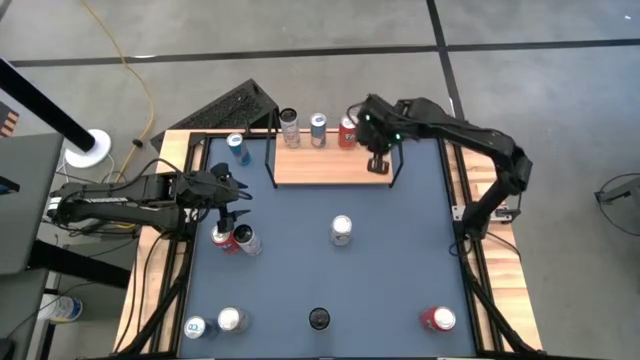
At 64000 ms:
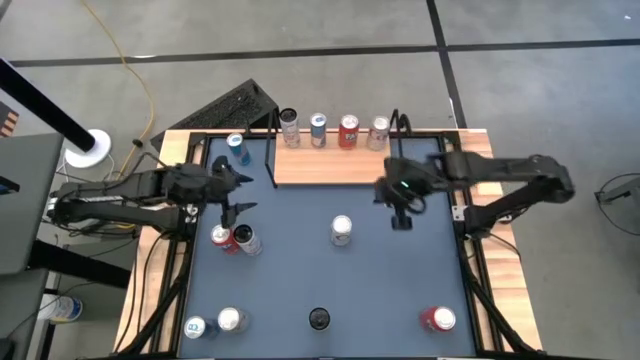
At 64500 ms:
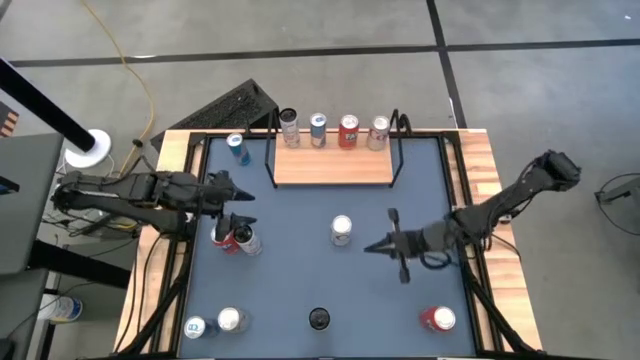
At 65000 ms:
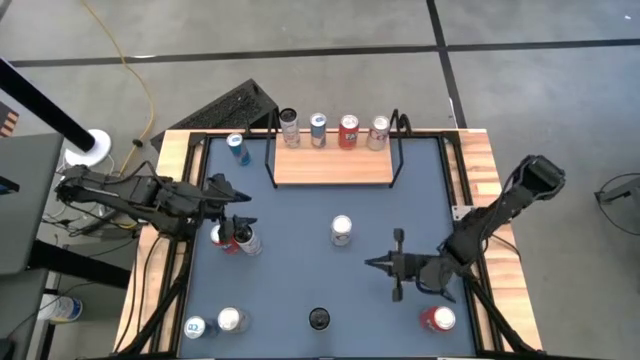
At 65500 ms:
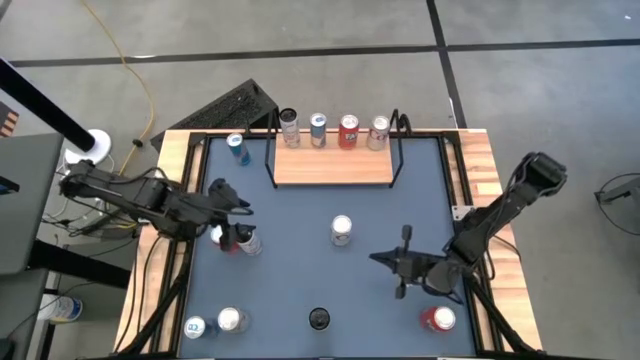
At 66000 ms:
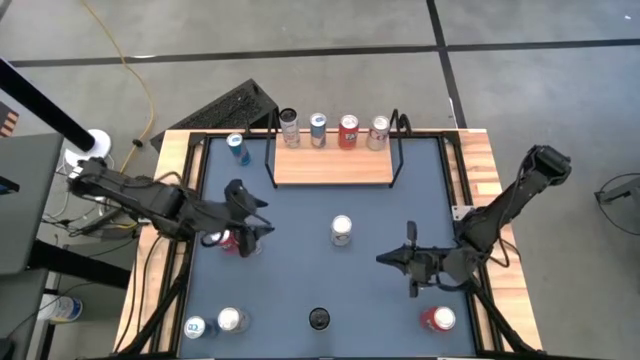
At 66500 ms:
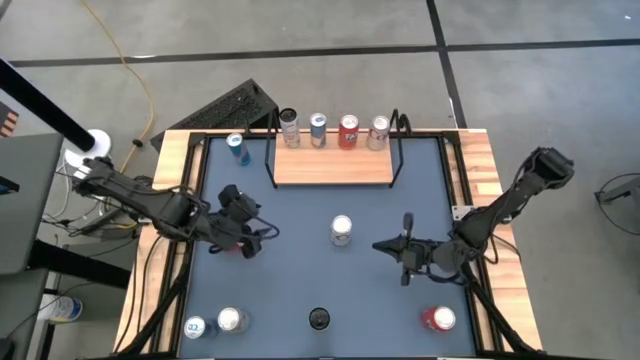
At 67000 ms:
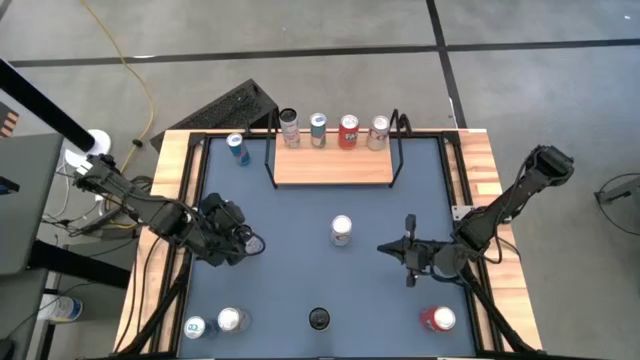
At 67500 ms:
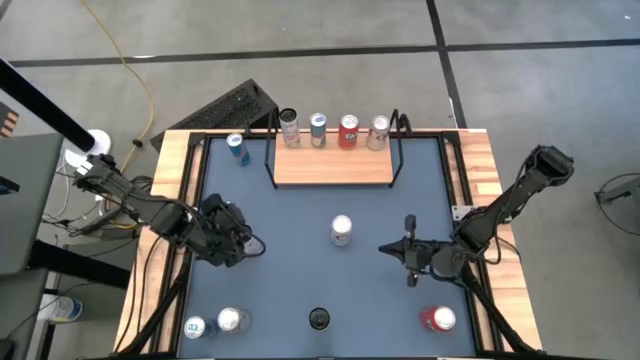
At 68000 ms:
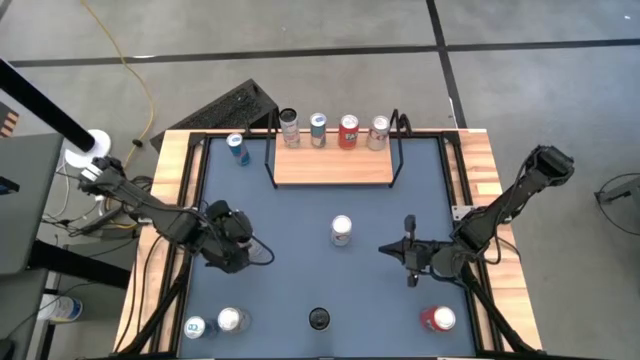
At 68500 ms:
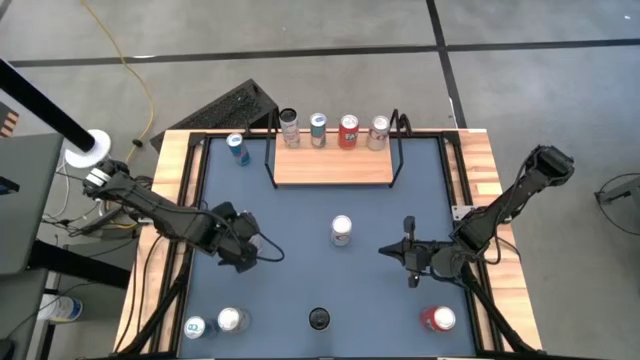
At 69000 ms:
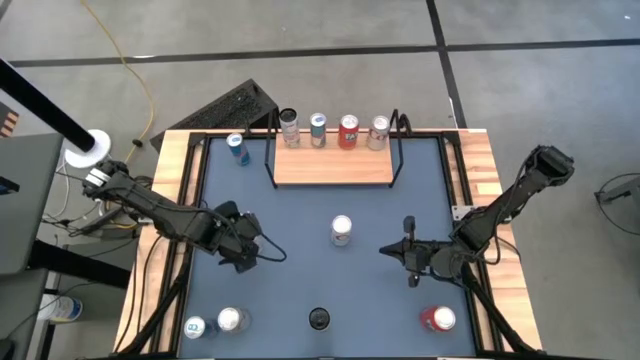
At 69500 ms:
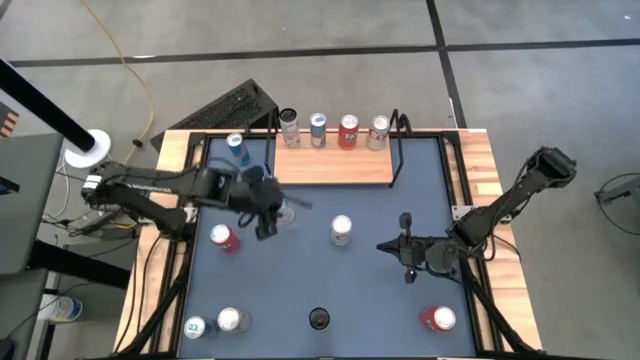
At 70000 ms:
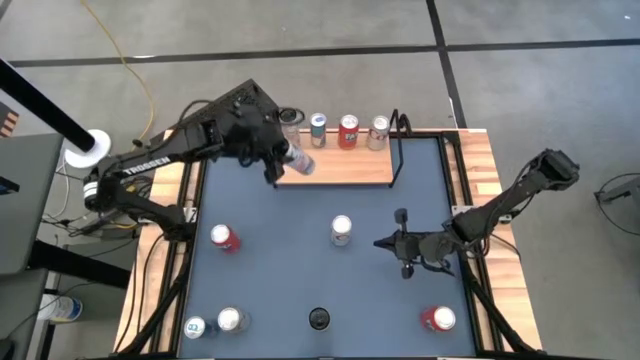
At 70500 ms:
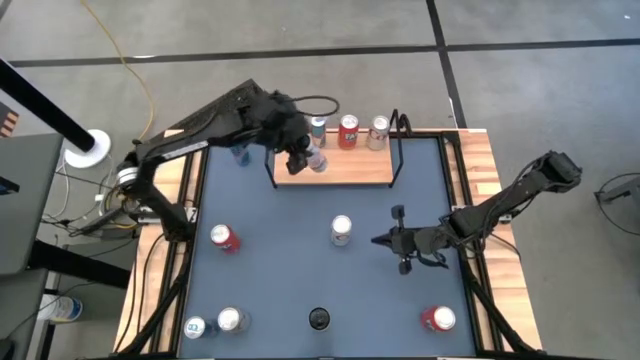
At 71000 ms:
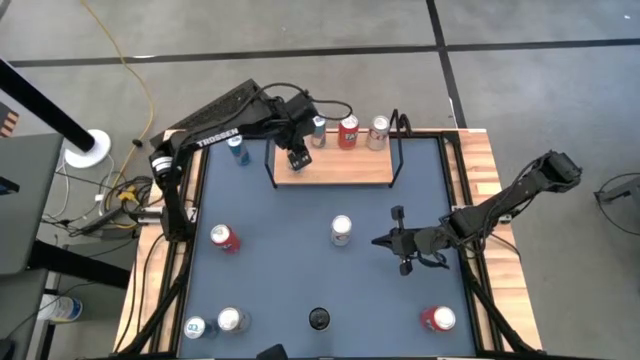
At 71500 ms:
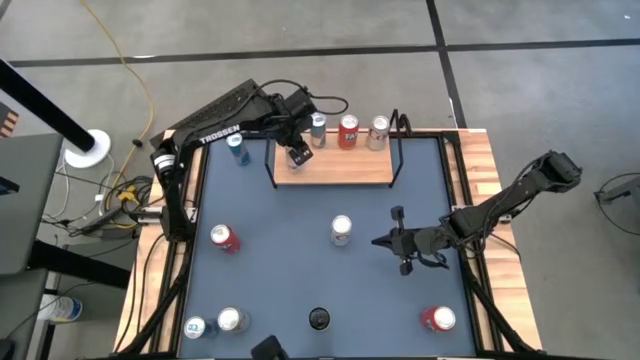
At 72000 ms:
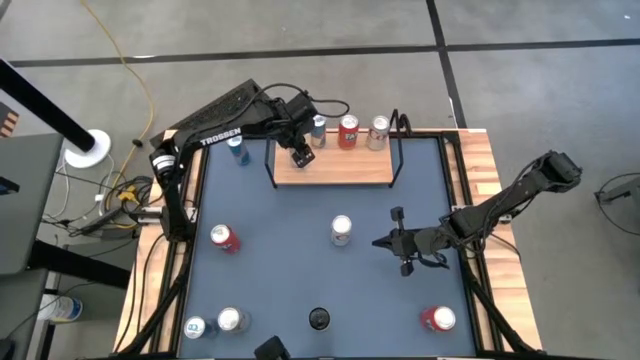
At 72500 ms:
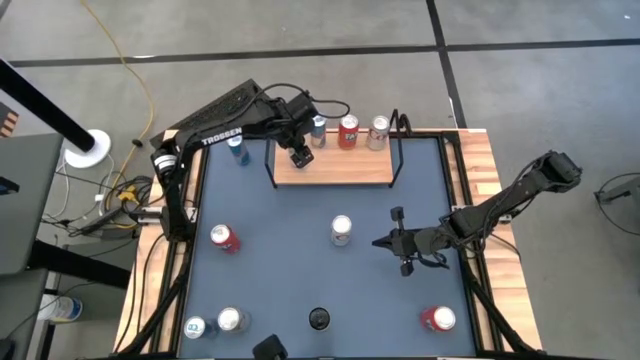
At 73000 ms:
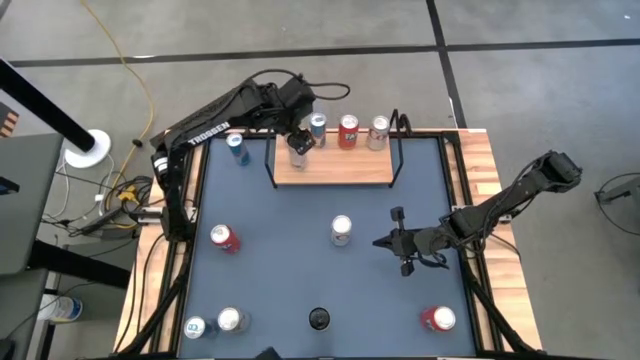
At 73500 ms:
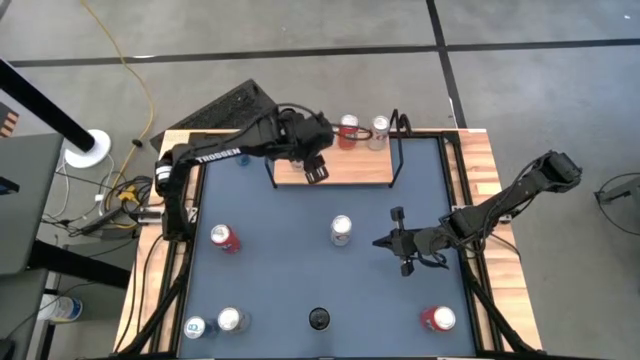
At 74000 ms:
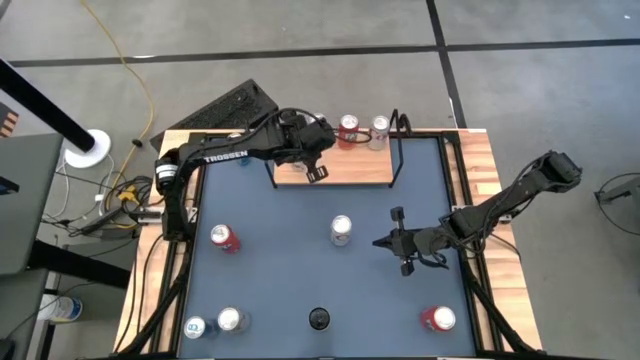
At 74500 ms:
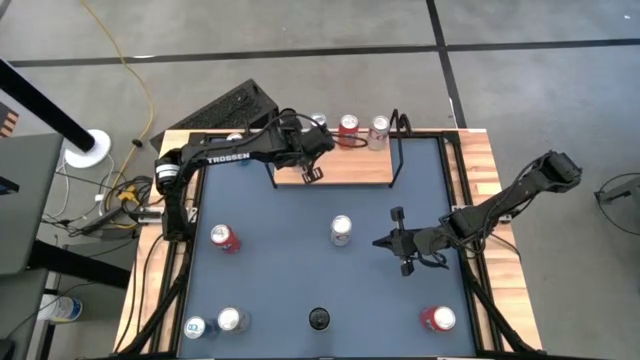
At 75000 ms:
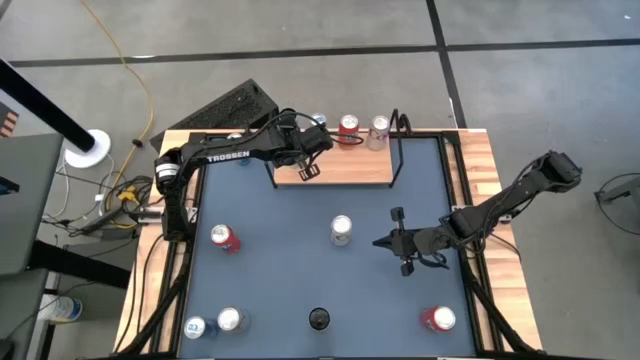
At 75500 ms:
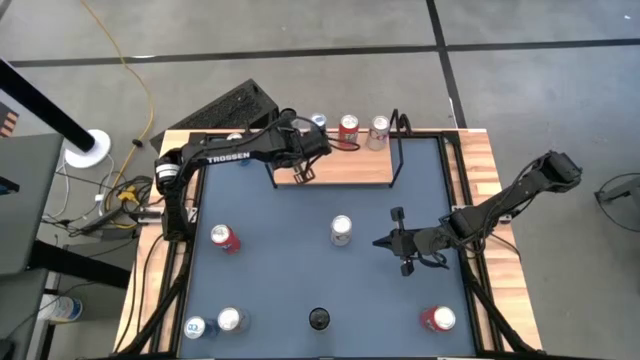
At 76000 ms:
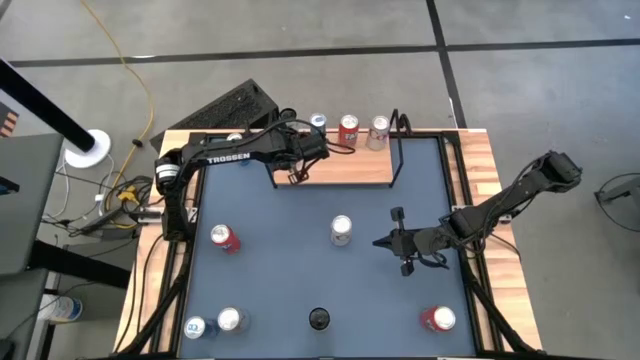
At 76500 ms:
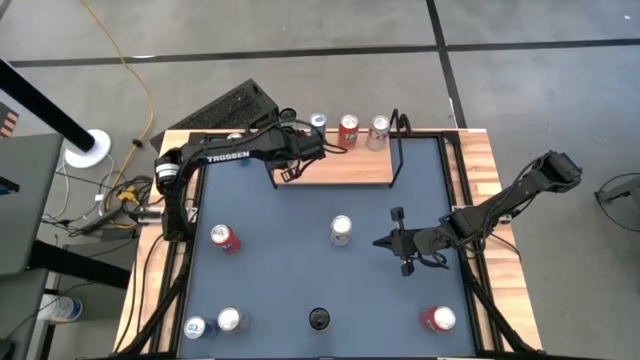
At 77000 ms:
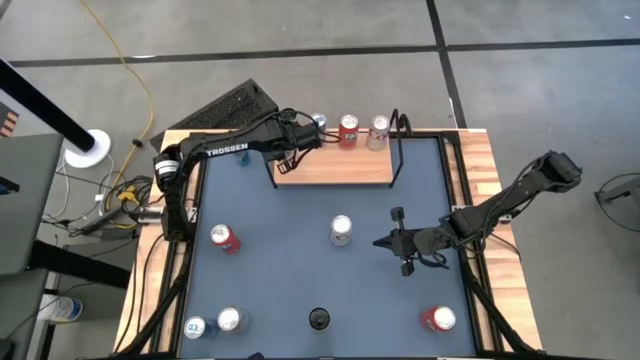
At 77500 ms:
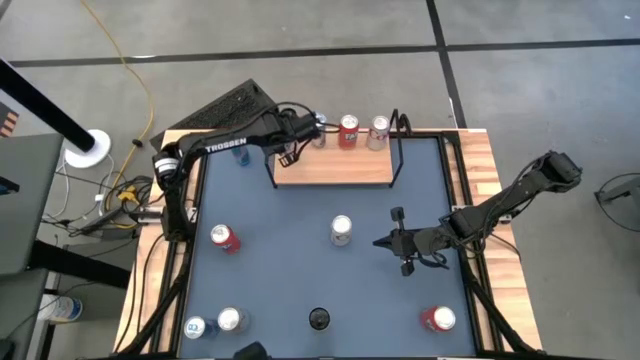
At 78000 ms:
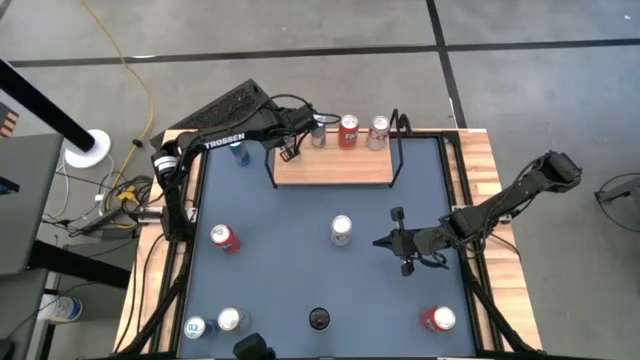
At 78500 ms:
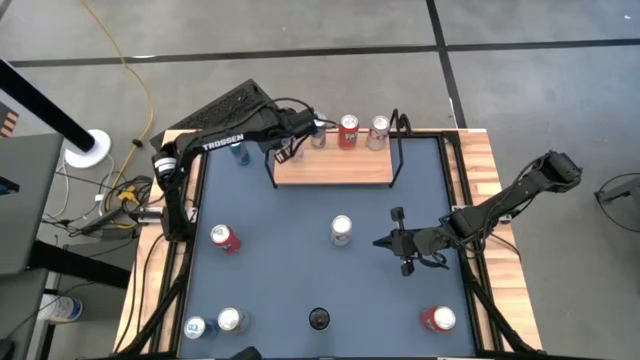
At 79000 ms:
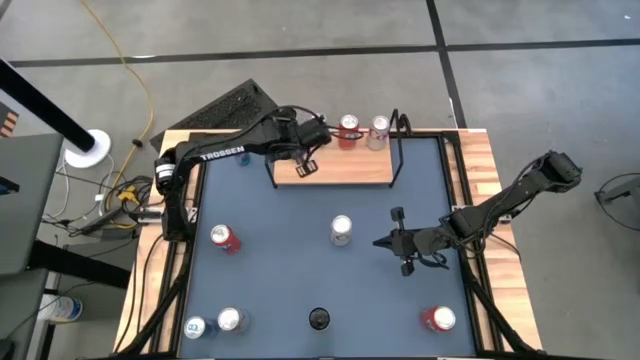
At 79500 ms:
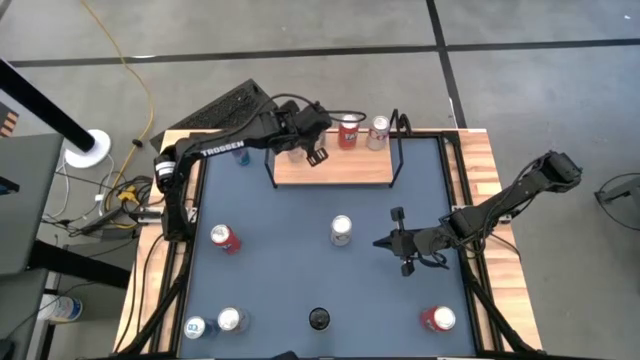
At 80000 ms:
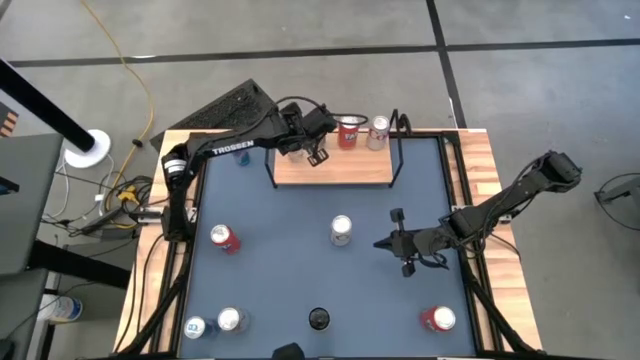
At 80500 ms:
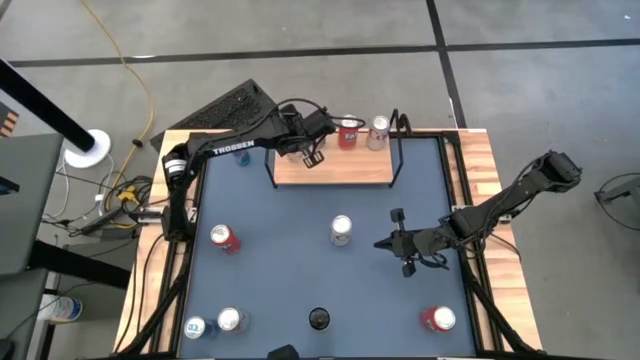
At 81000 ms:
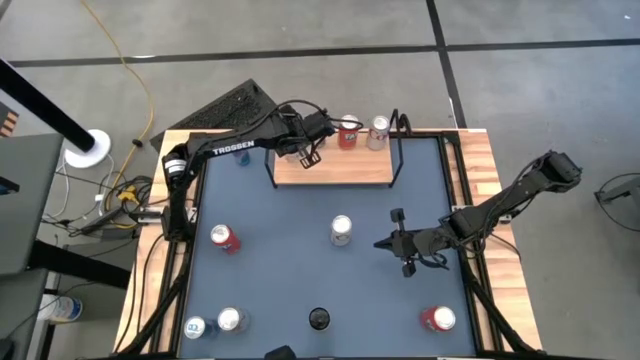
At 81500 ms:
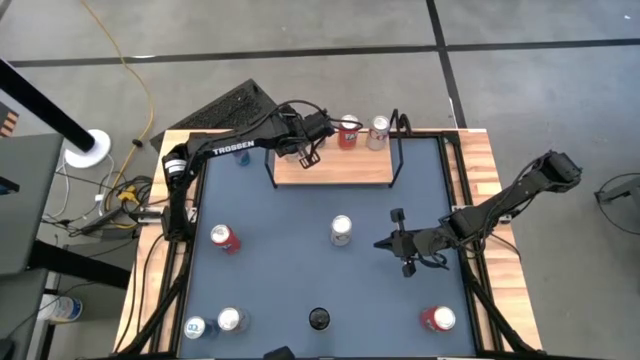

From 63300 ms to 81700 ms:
Task: Place canned beverage on shelf
Put the top white soda can on the shelf aligned with the other white soda can

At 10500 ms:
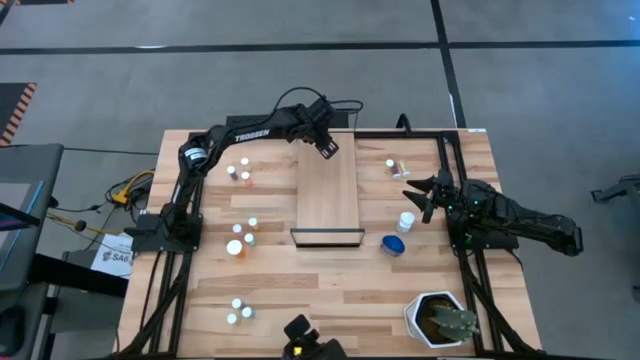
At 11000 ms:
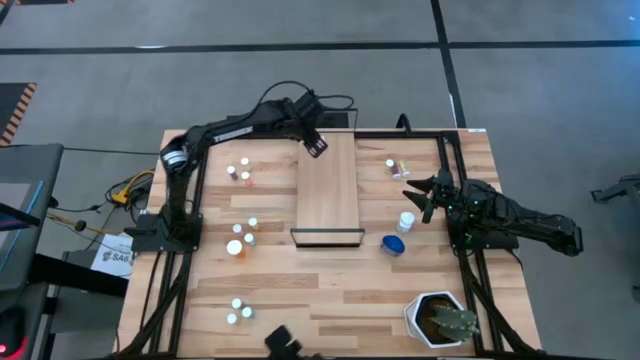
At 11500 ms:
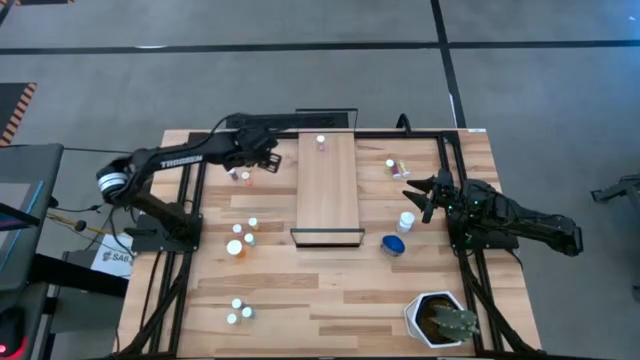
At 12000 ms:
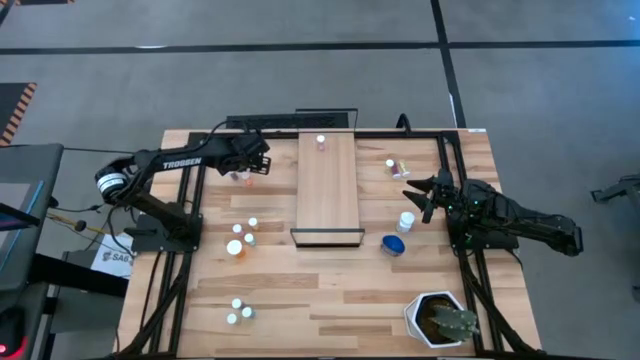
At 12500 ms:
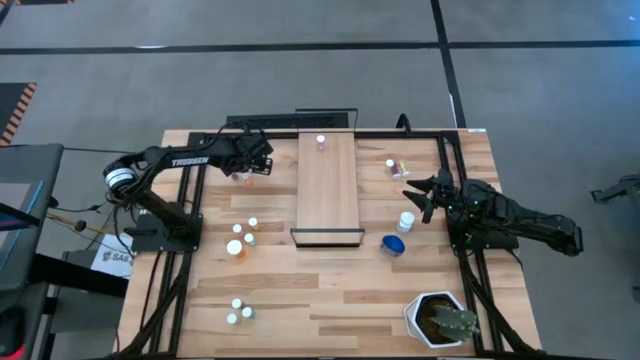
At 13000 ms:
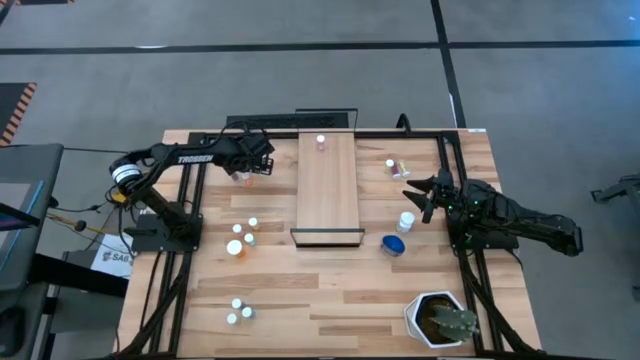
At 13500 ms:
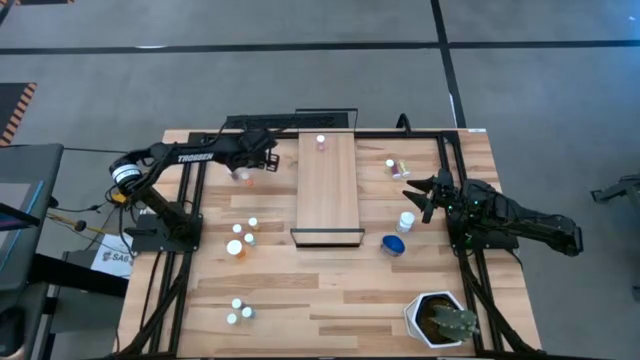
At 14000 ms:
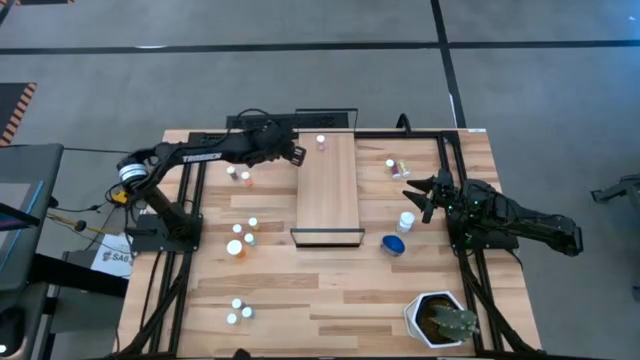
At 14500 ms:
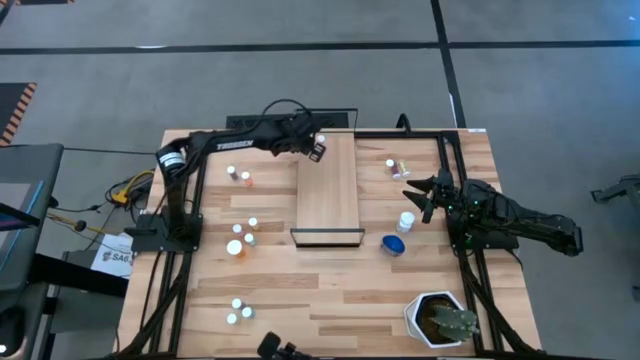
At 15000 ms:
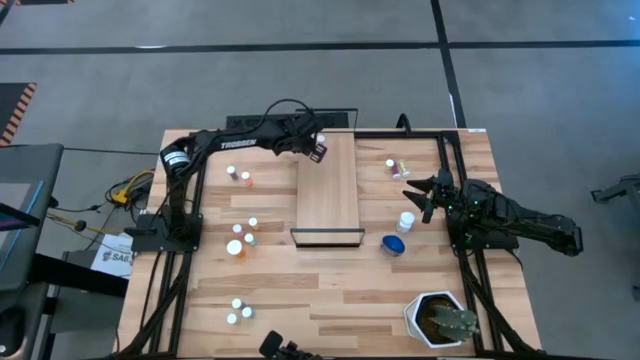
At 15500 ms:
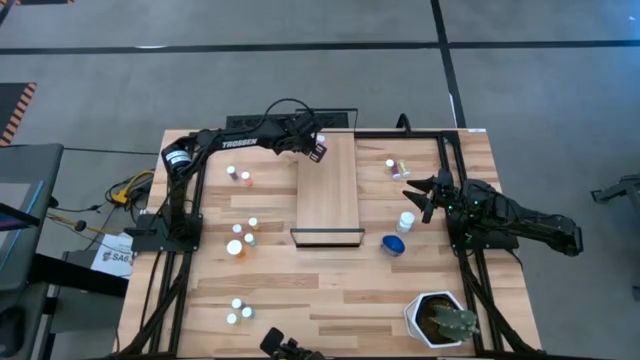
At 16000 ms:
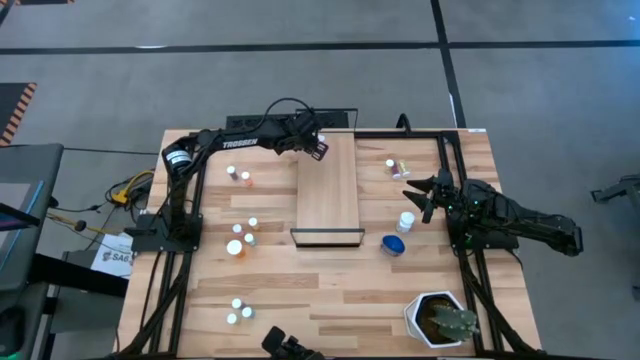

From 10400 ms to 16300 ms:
Task: Pick and place medicine bottles onto shelf by color
Put the yellow pill bottle on the shelf
